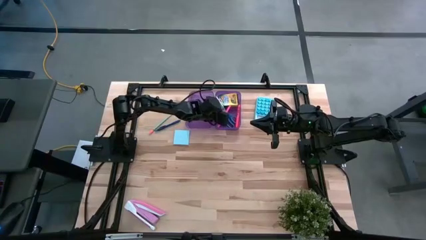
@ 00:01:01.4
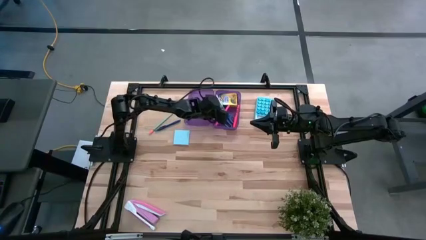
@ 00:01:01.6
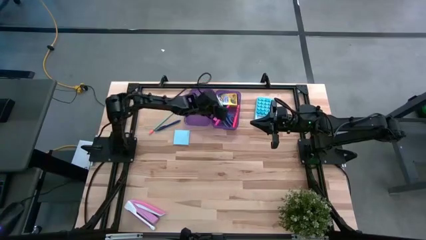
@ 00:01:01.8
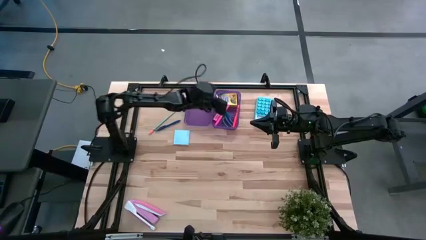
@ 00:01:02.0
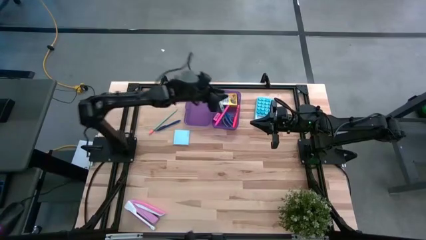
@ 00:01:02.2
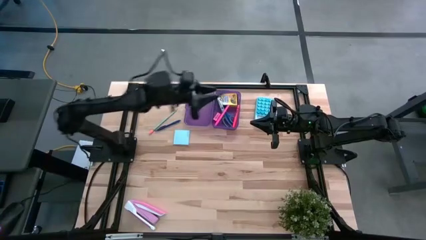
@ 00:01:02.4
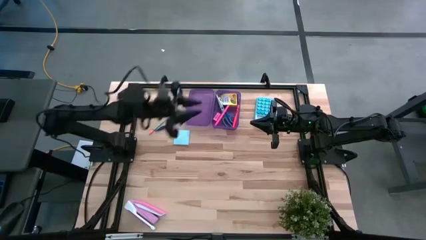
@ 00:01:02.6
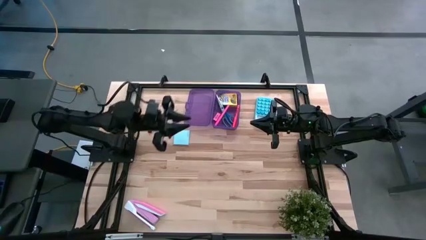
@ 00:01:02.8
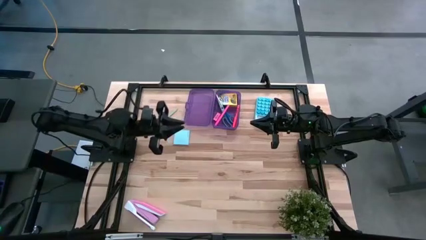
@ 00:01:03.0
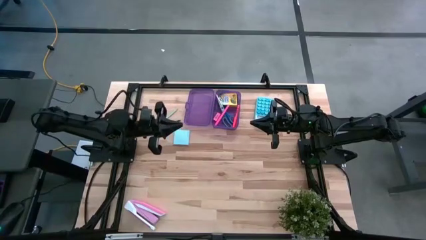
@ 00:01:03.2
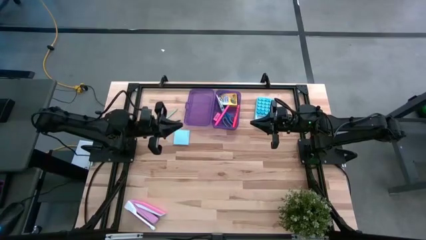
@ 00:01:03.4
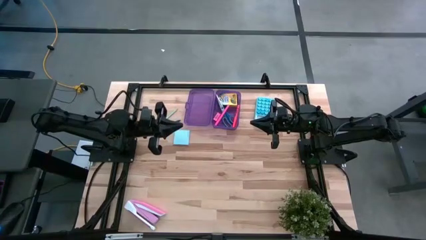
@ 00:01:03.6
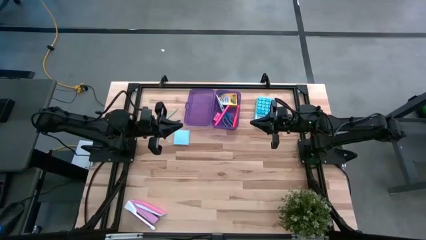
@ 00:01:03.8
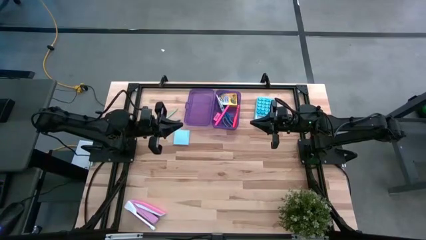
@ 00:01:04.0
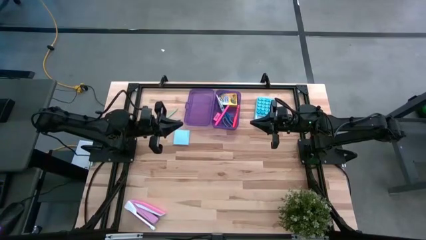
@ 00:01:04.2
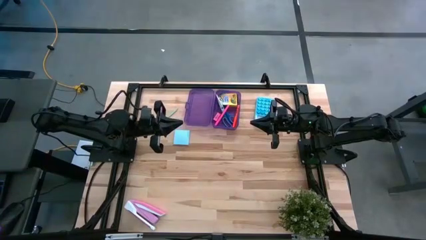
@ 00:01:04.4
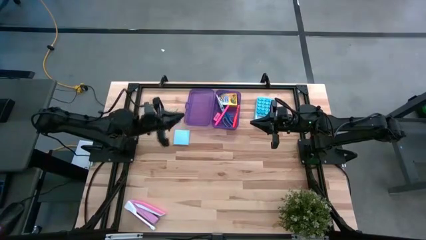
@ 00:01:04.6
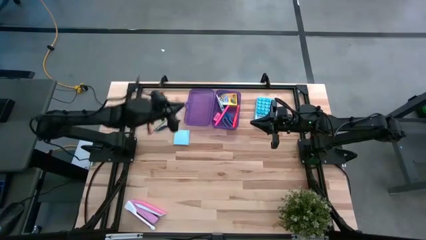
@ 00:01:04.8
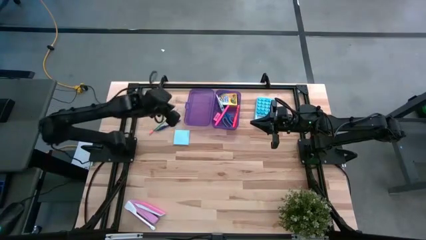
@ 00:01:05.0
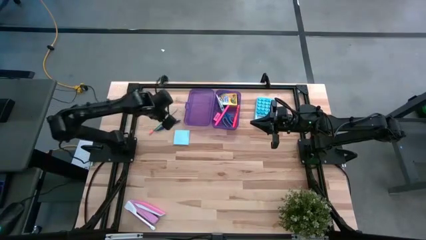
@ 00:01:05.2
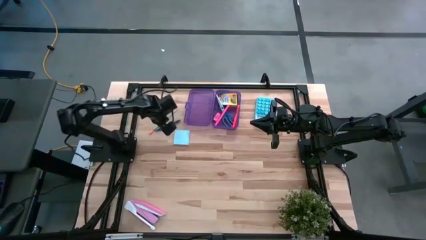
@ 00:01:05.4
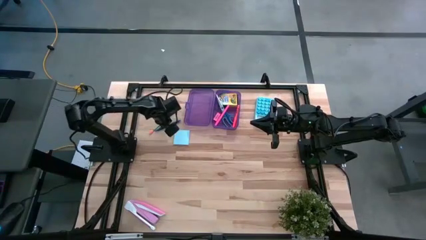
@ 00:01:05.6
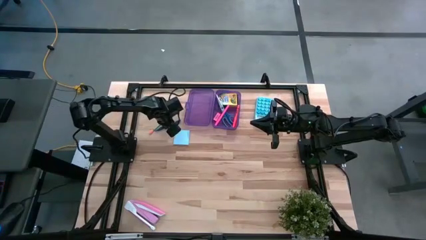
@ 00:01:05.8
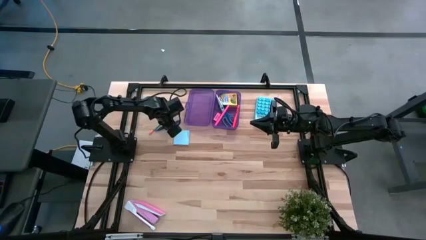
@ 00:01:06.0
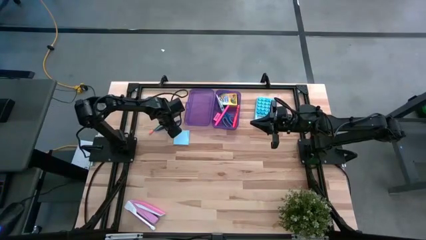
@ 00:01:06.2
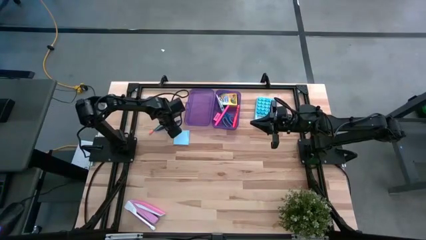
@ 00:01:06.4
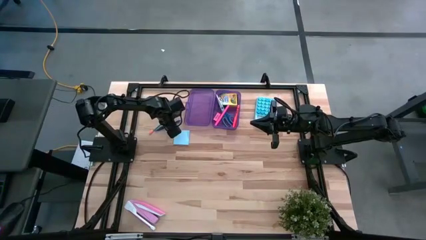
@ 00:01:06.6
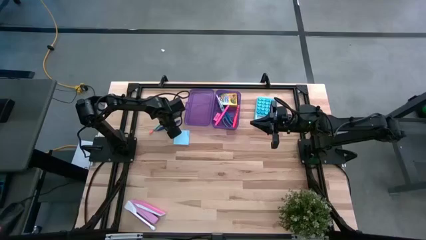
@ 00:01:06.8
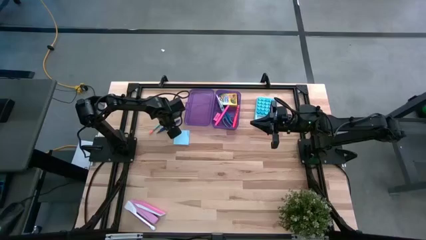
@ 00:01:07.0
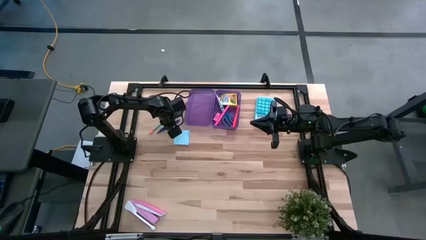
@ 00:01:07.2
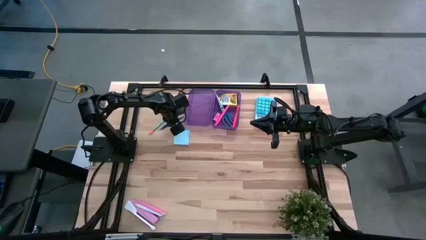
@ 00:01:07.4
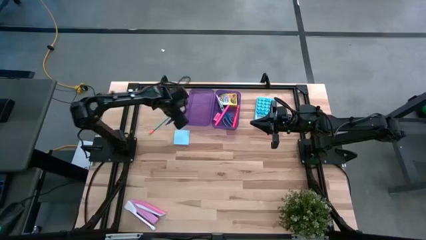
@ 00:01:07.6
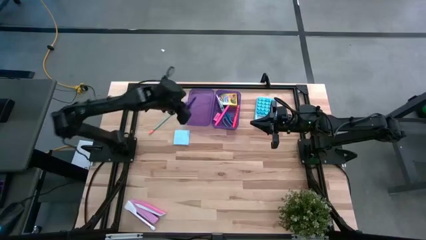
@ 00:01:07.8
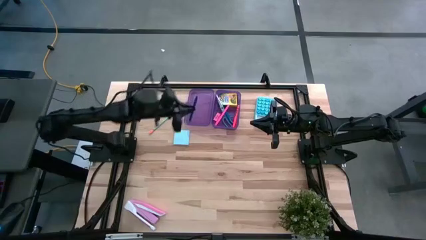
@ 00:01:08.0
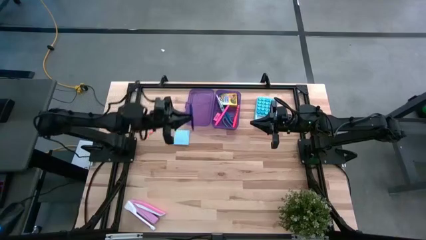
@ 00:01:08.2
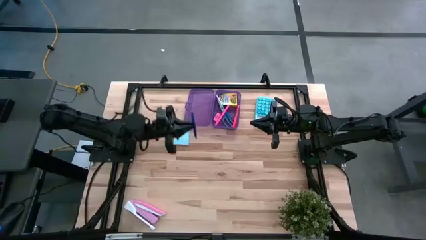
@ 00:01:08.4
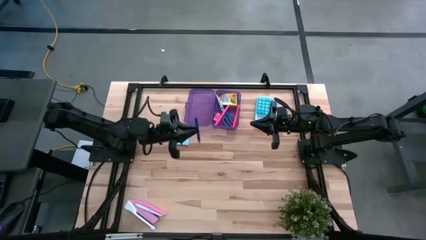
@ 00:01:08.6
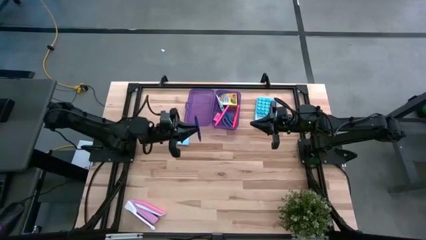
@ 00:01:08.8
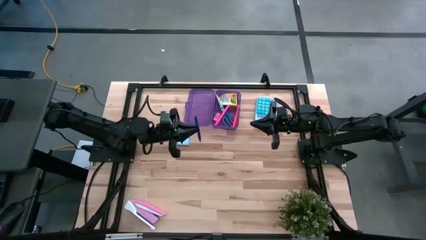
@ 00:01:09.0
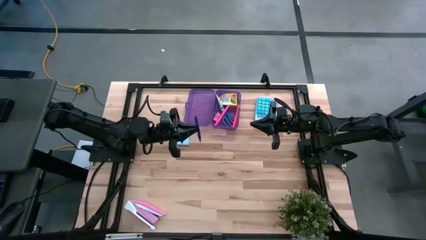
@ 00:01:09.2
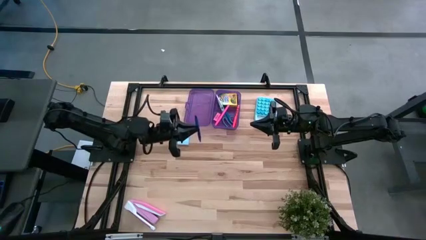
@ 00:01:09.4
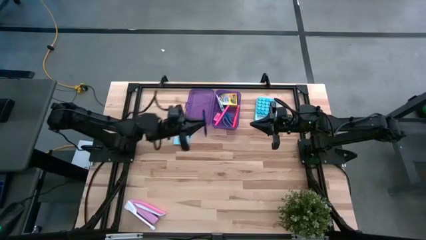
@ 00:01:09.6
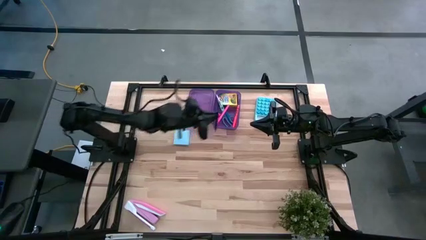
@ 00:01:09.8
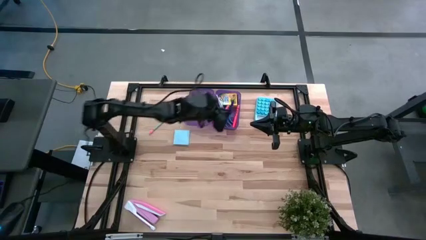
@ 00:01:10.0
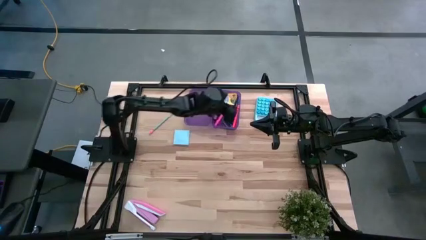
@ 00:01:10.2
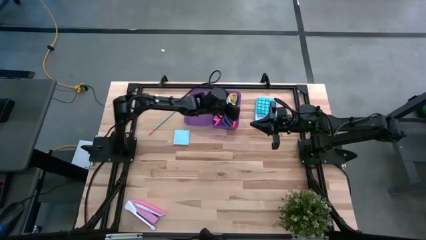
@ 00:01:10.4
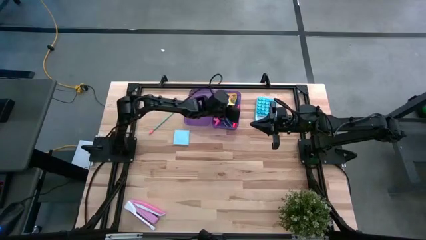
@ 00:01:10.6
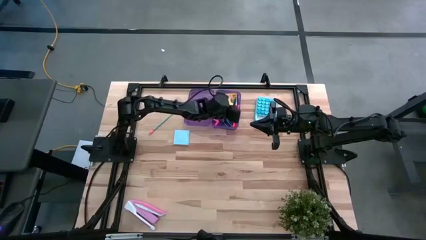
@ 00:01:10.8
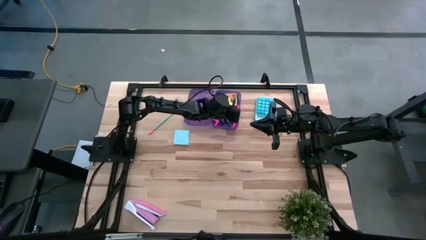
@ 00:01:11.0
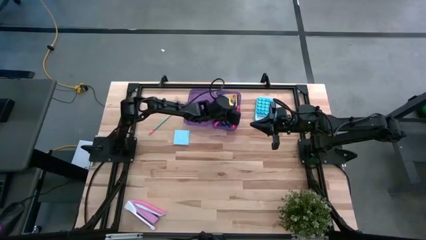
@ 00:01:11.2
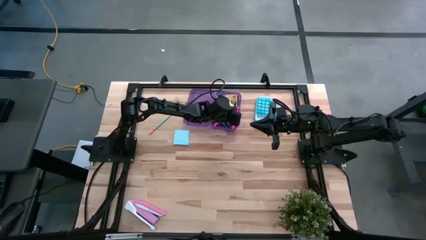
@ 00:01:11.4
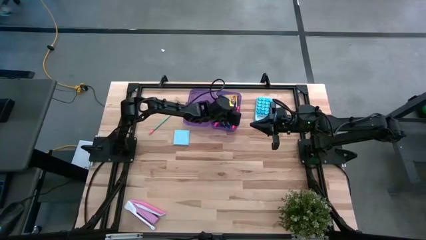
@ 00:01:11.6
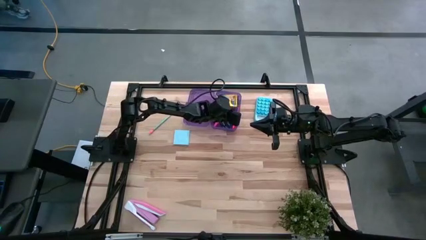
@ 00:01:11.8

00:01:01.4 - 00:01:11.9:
Task: Pack school essentials
Put the blue pen into the purple supply box
